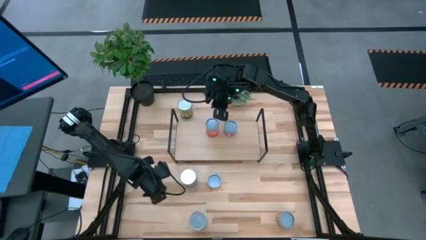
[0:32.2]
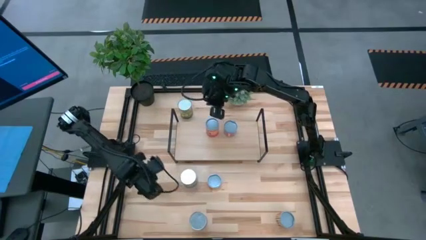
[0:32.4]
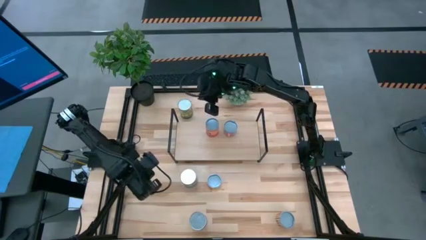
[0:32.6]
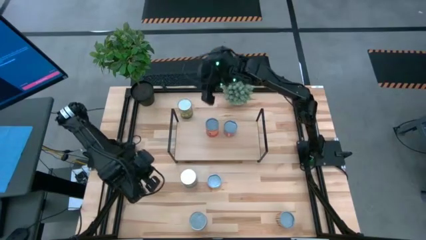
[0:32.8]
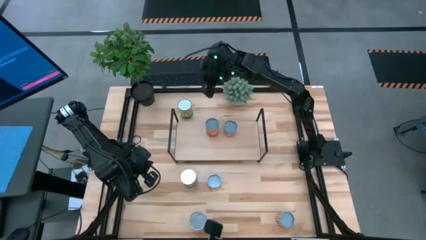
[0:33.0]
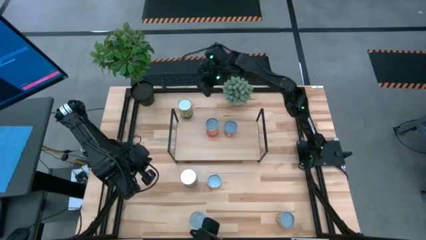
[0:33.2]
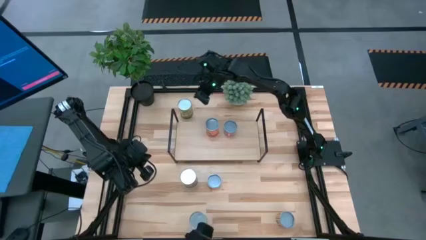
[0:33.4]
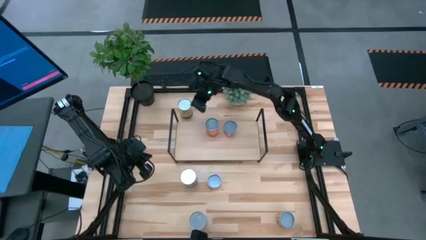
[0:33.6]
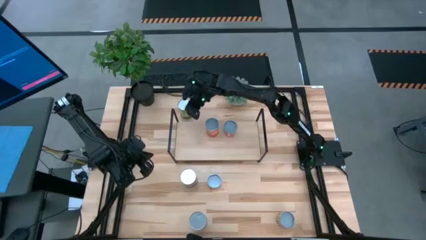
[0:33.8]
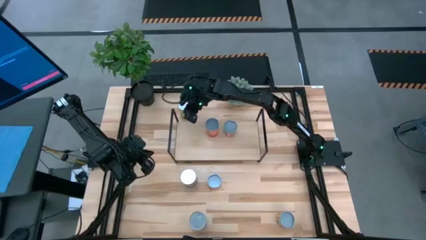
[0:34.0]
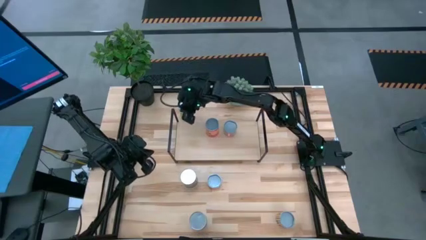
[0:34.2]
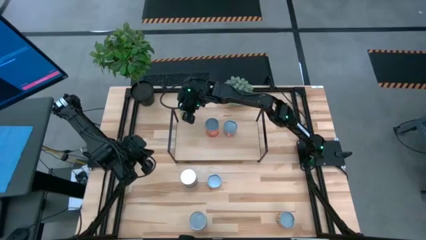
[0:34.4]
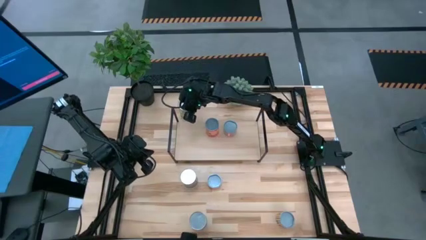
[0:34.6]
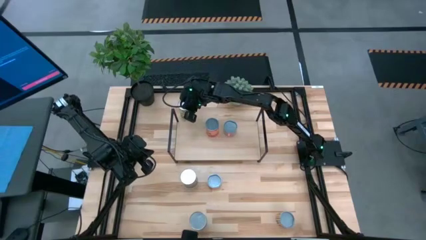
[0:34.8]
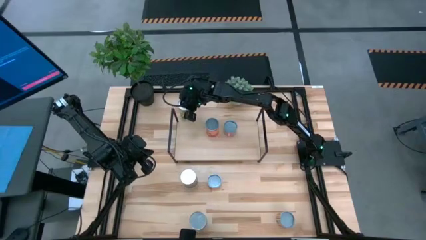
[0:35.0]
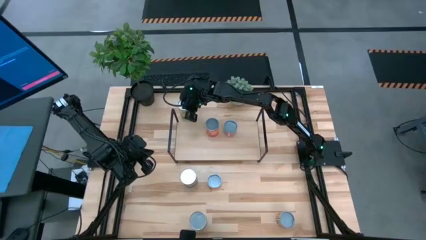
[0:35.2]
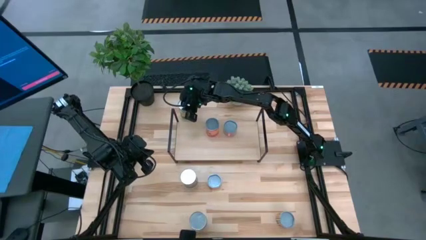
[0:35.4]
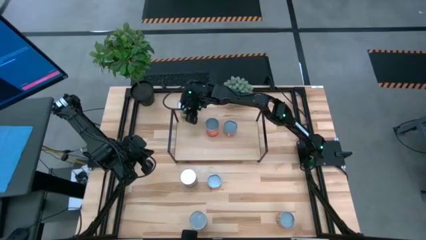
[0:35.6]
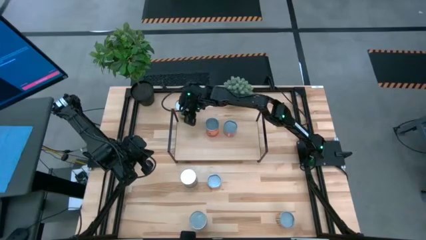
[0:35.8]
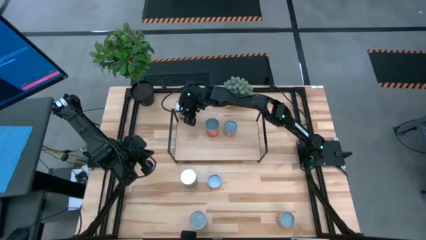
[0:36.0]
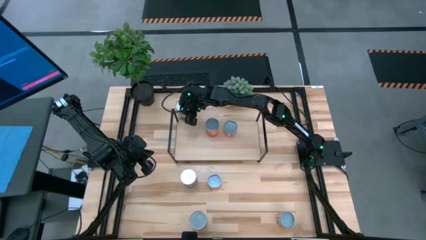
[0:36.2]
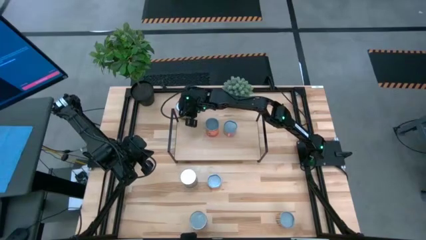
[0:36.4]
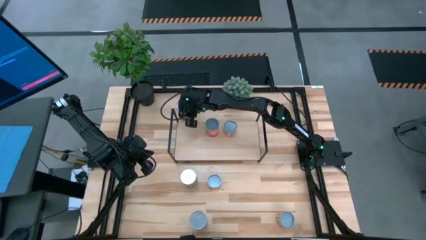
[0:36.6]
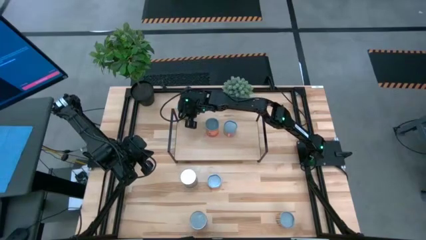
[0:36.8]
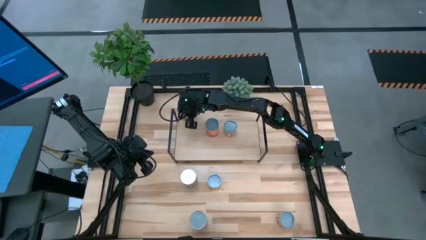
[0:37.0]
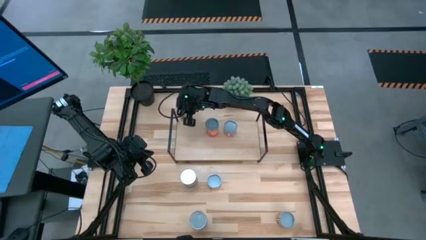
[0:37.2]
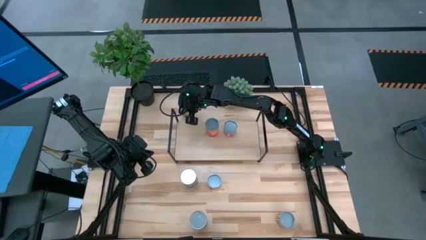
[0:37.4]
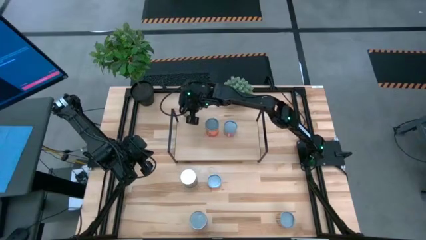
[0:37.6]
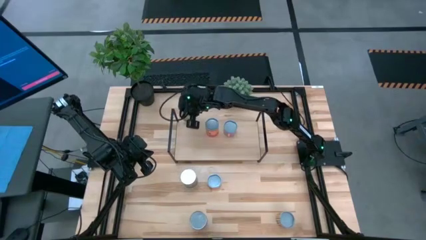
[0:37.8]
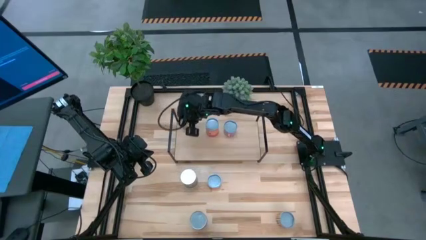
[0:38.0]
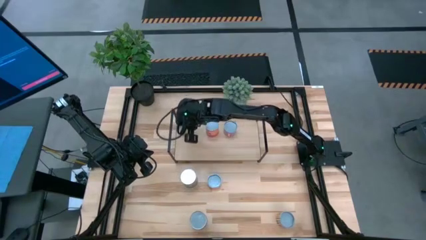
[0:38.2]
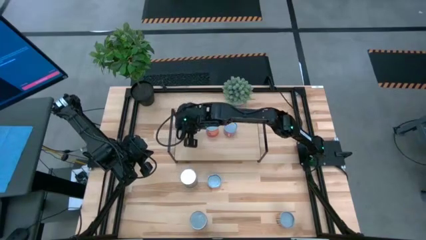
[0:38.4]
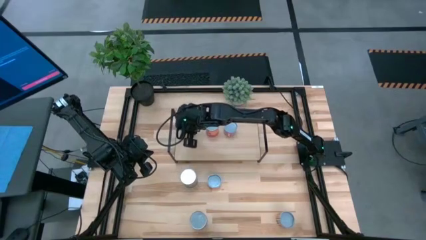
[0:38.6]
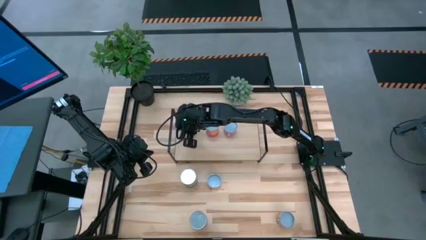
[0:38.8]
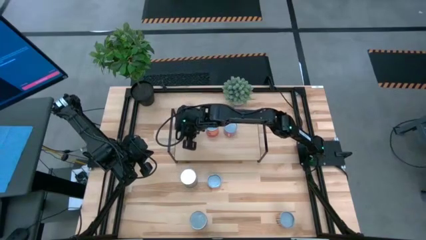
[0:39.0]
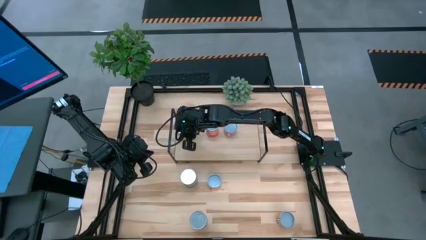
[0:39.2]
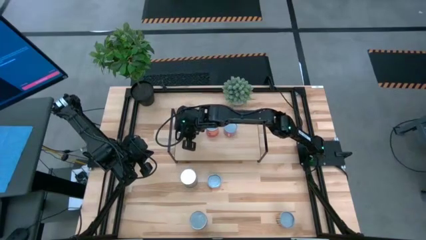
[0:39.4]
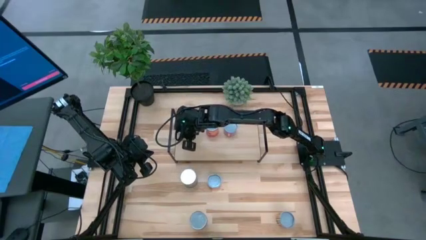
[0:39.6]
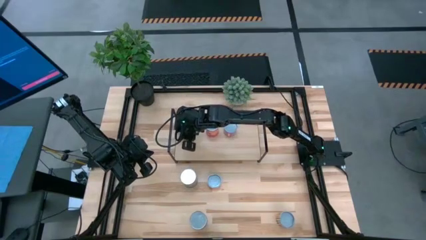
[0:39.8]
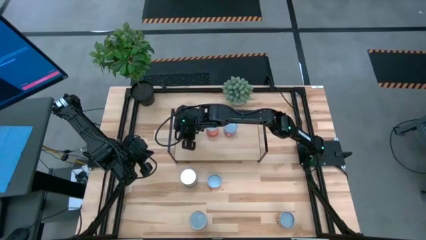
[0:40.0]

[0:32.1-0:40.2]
Task: Pick and place cans onto a shelf
Put the canned pears on the shelf

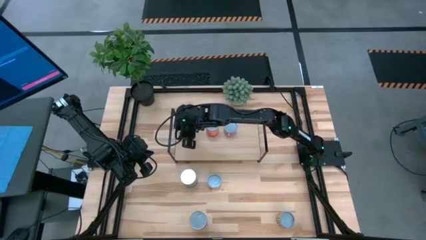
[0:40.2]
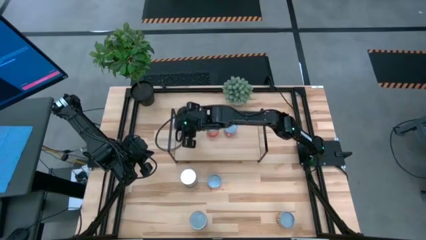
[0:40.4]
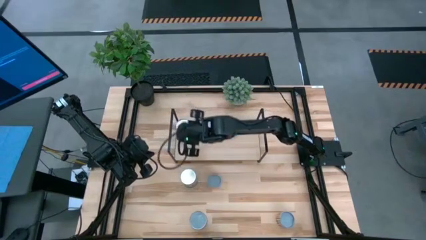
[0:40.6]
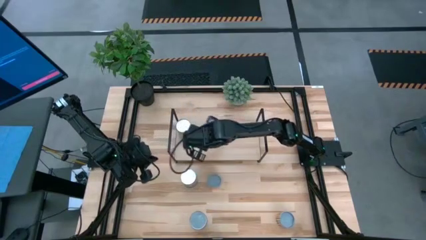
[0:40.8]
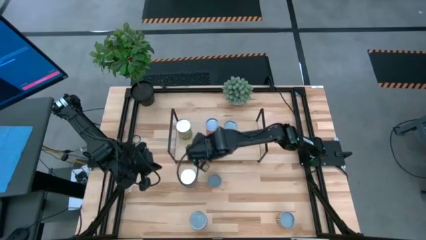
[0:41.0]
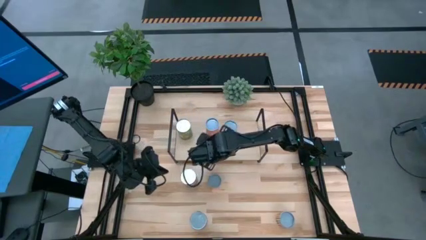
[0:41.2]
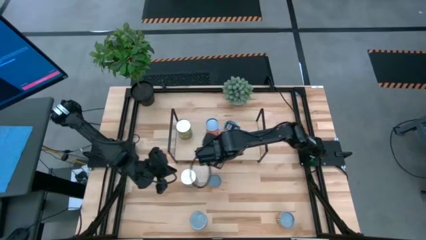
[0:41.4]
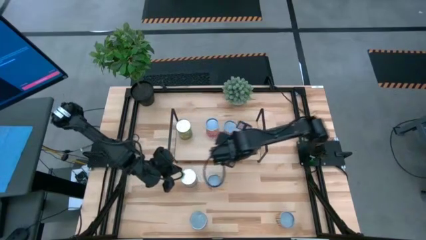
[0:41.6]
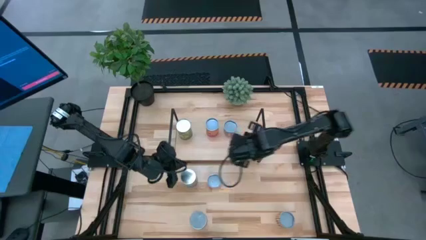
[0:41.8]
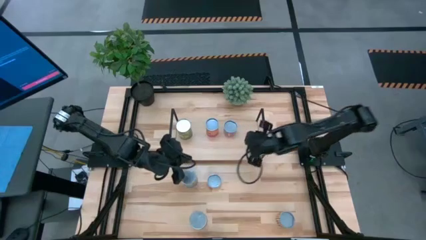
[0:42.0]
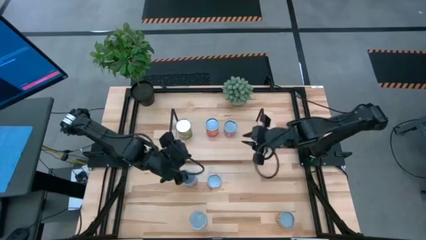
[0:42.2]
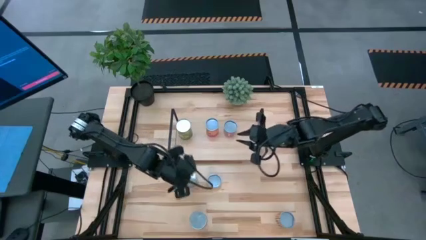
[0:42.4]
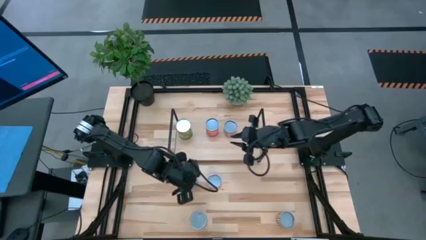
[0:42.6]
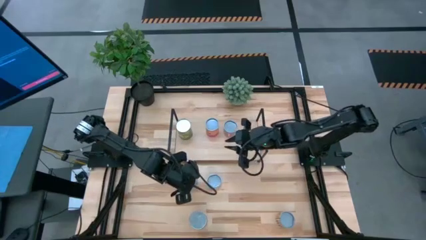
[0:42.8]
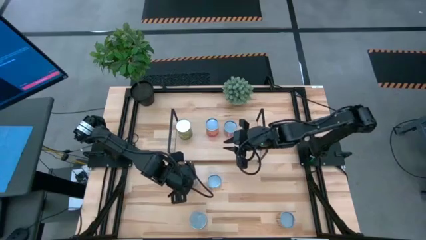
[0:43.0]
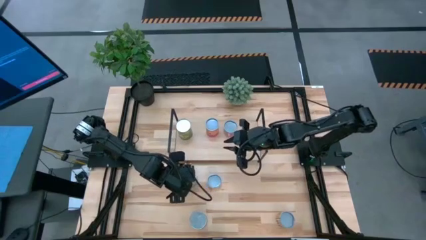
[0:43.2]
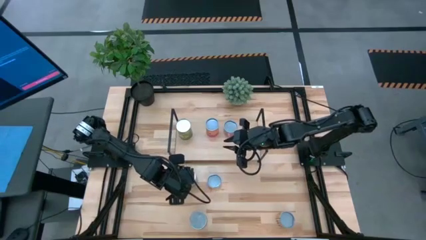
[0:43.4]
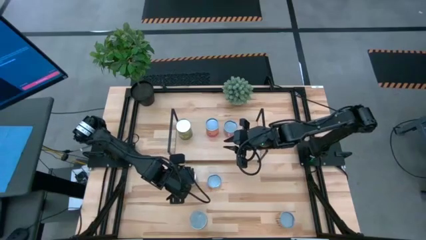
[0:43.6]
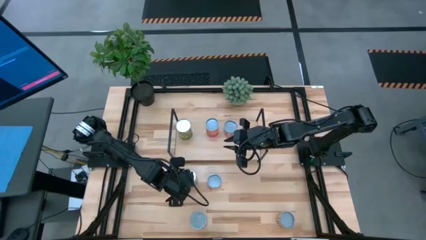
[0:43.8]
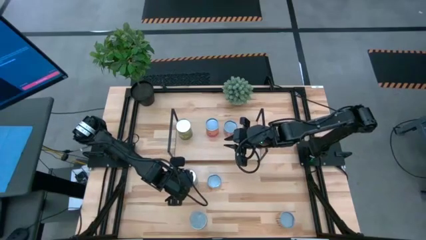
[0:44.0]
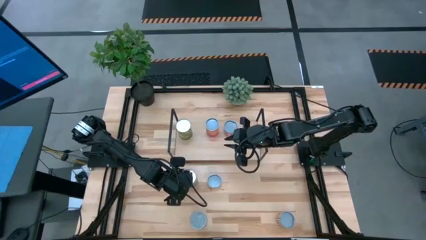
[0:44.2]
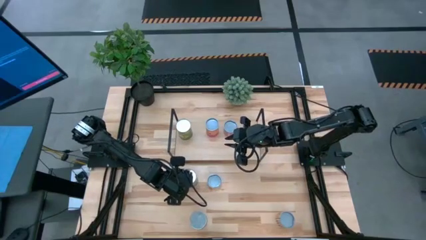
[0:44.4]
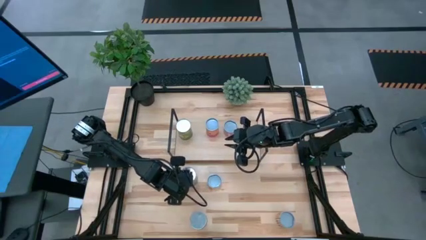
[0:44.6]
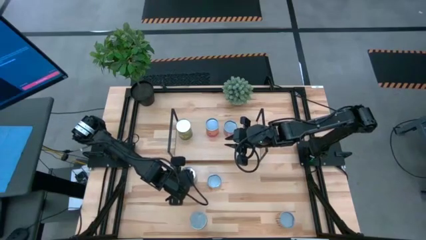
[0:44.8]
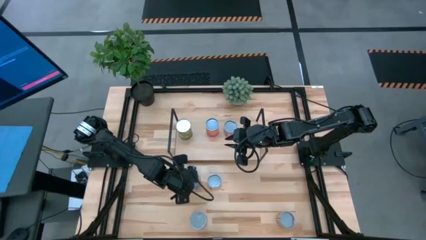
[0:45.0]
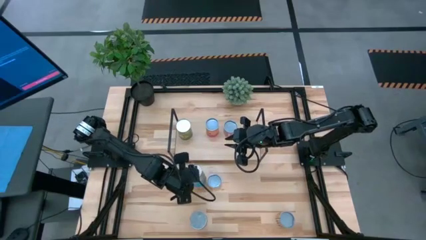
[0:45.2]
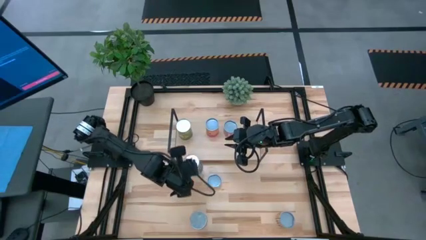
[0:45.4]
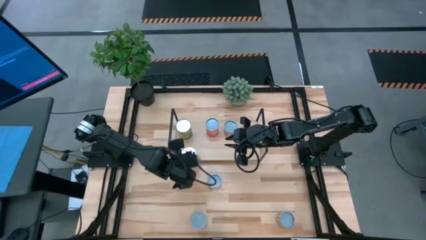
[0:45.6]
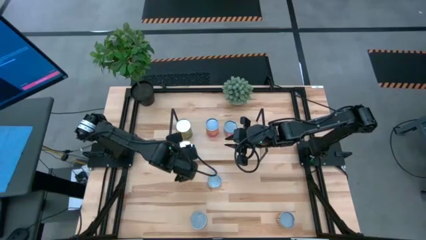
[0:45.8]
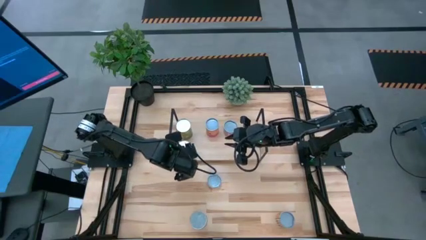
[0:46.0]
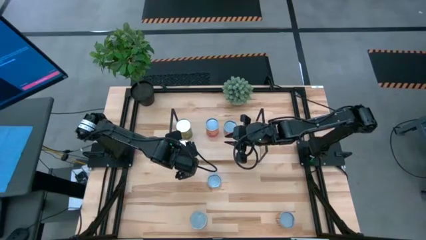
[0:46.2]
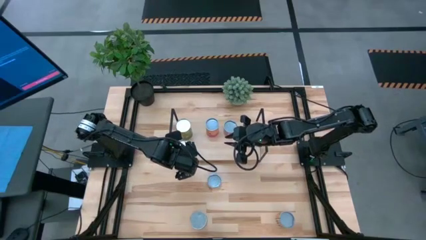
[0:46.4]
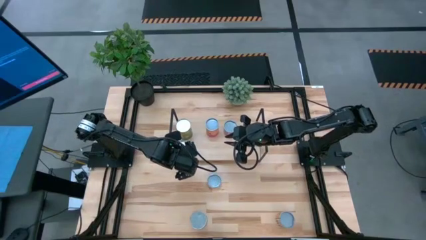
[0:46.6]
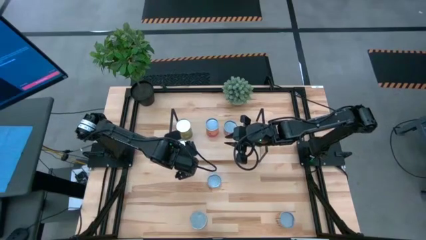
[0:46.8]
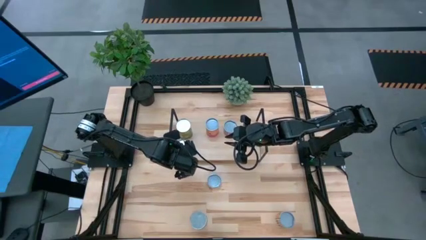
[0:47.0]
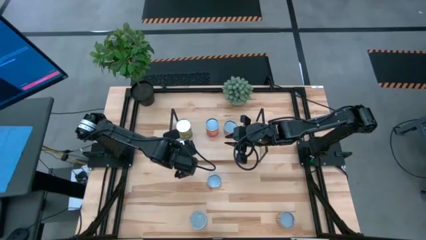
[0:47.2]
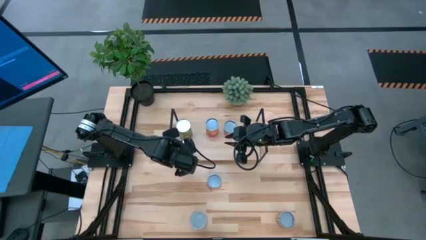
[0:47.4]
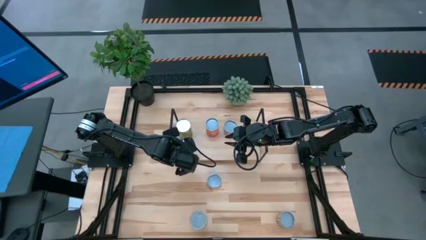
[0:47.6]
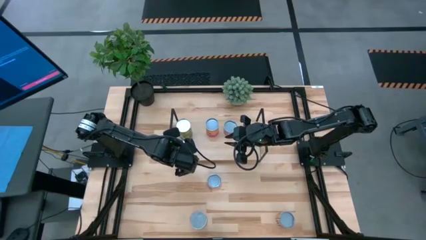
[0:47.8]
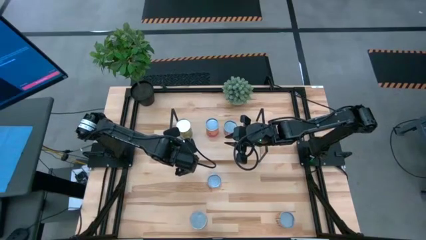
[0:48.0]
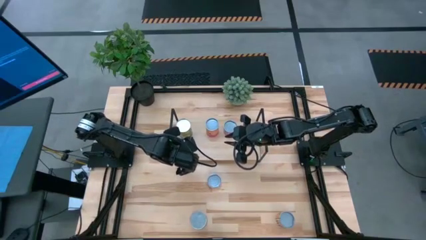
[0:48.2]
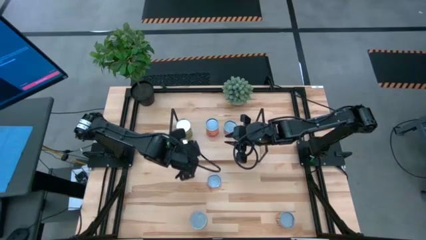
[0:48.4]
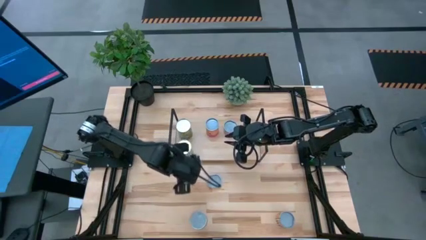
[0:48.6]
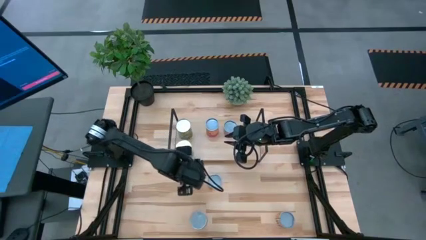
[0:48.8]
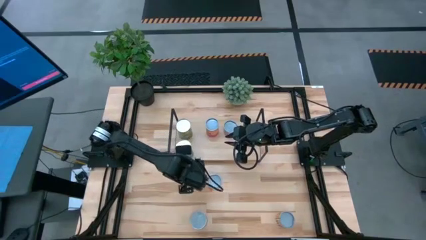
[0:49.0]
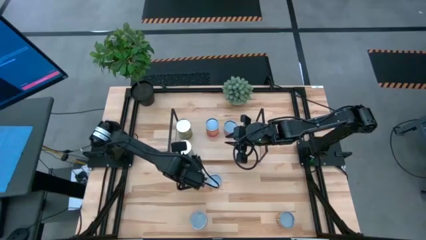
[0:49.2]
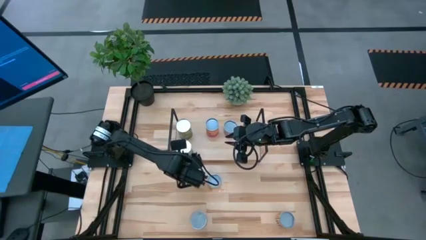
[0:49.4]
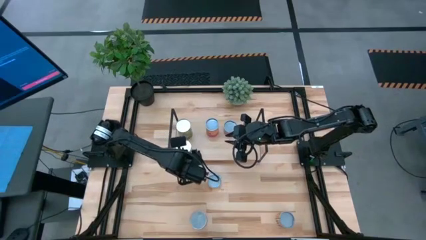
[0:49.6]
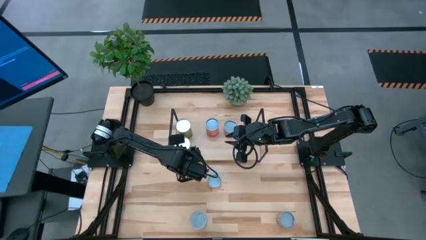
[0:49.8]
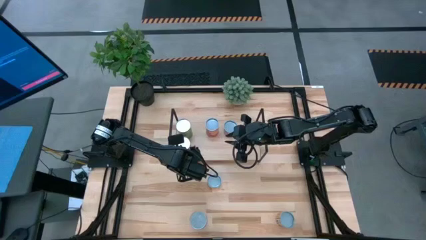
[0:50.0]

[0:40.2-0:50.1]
Put the canned tomatoes on the shelf
